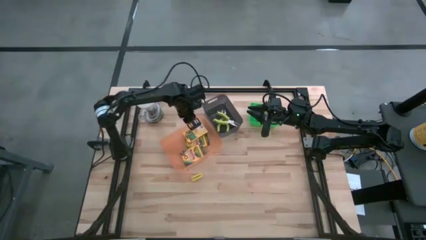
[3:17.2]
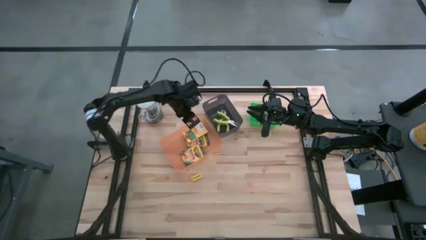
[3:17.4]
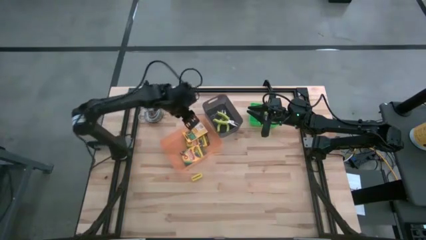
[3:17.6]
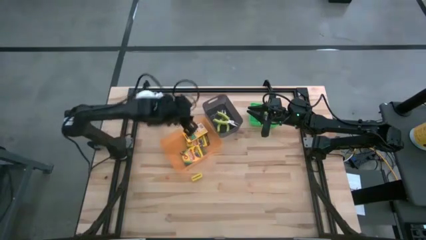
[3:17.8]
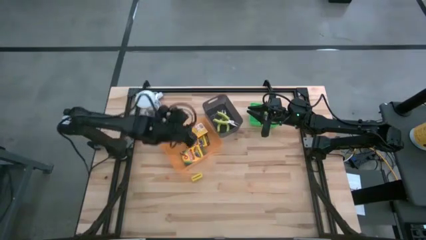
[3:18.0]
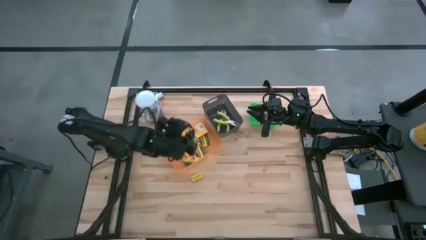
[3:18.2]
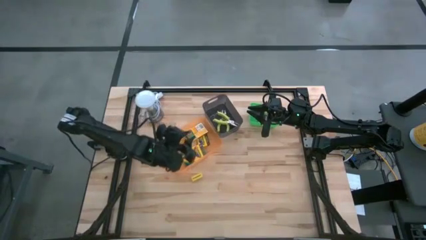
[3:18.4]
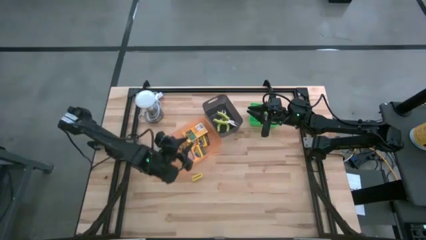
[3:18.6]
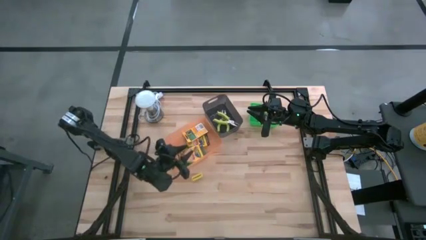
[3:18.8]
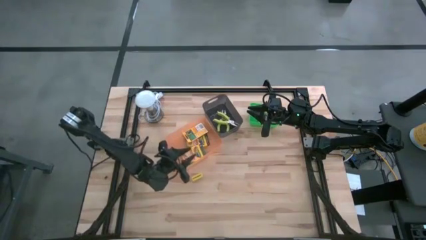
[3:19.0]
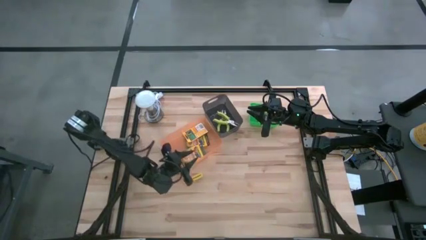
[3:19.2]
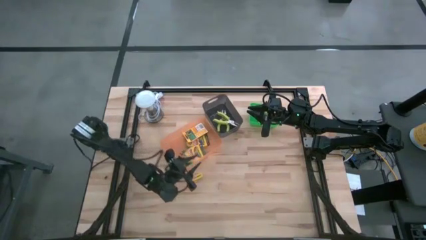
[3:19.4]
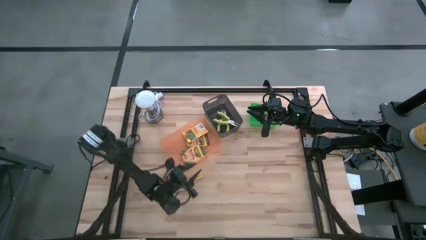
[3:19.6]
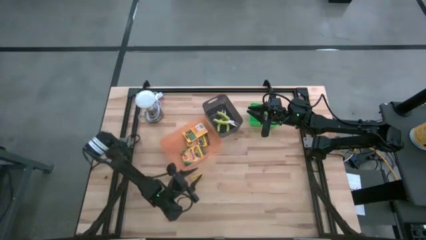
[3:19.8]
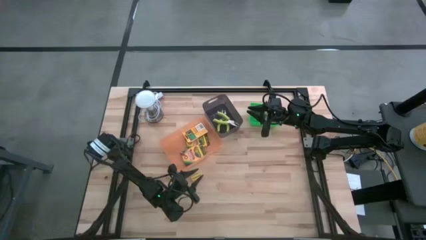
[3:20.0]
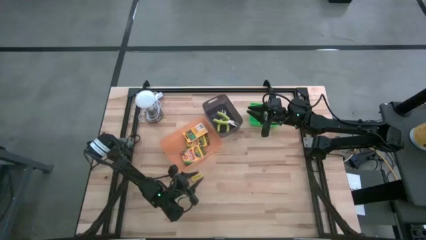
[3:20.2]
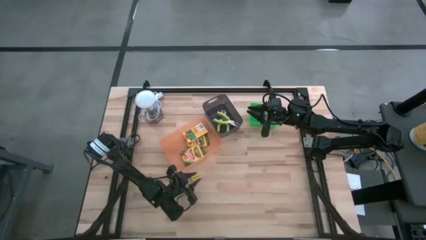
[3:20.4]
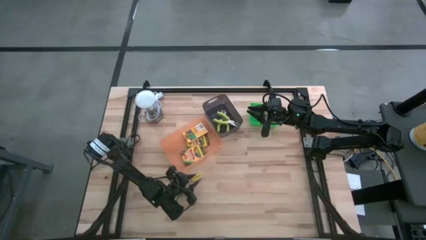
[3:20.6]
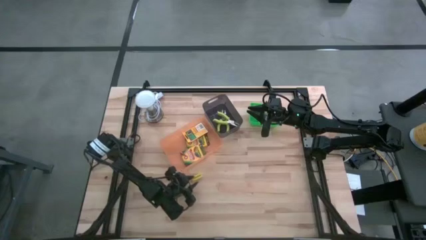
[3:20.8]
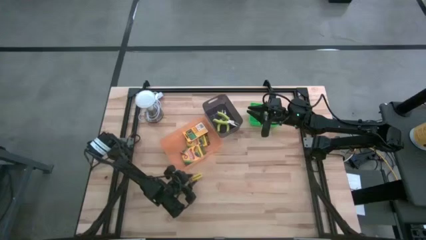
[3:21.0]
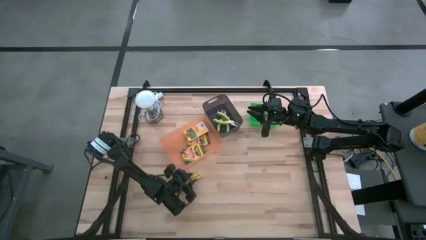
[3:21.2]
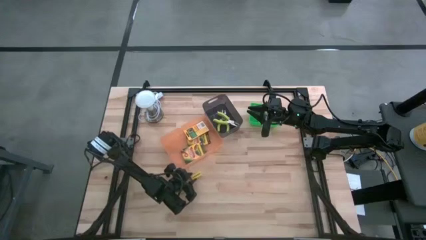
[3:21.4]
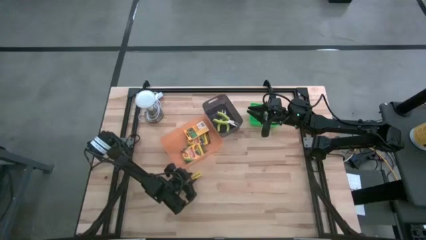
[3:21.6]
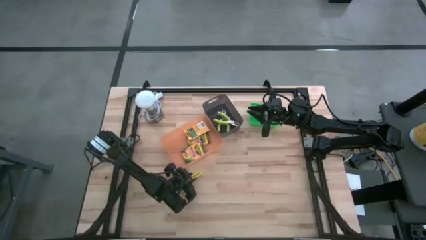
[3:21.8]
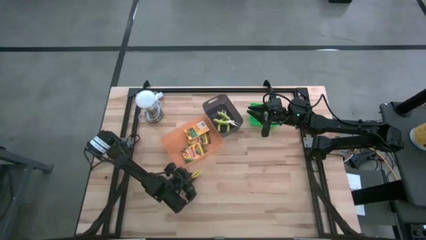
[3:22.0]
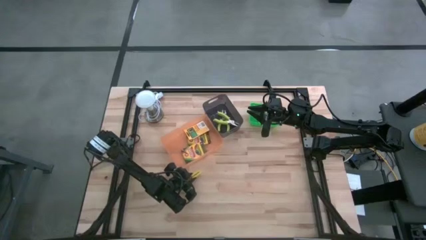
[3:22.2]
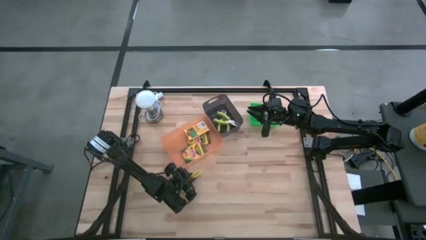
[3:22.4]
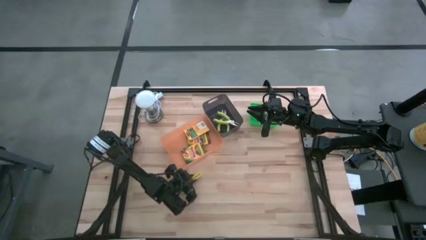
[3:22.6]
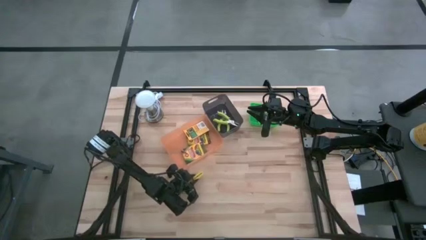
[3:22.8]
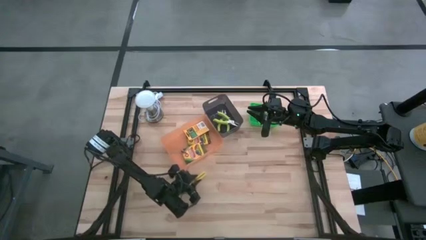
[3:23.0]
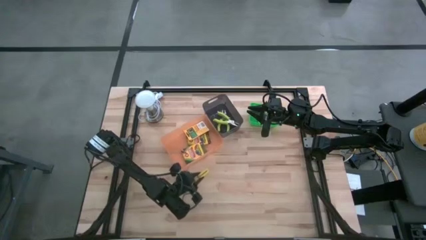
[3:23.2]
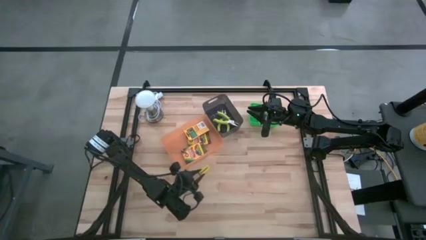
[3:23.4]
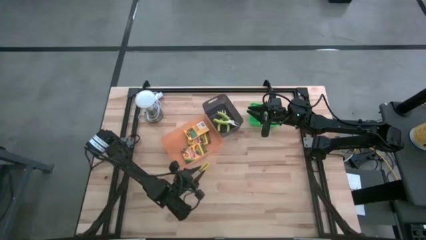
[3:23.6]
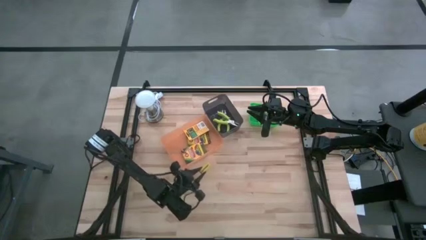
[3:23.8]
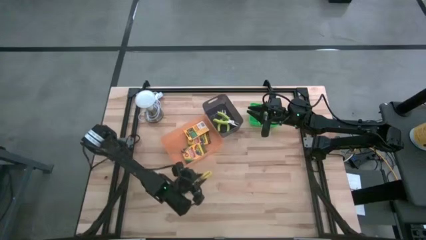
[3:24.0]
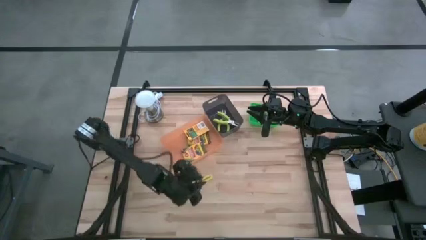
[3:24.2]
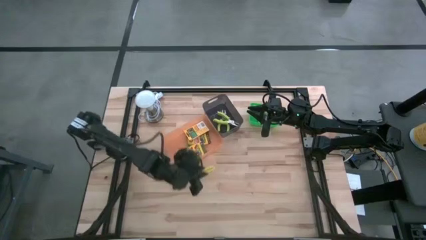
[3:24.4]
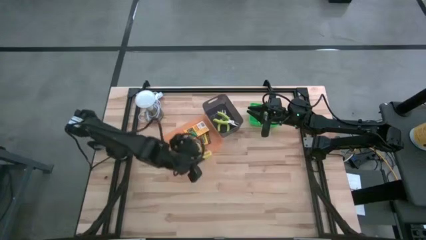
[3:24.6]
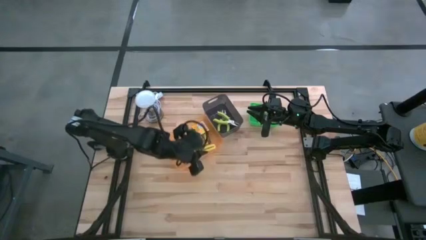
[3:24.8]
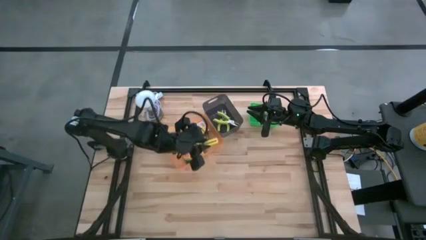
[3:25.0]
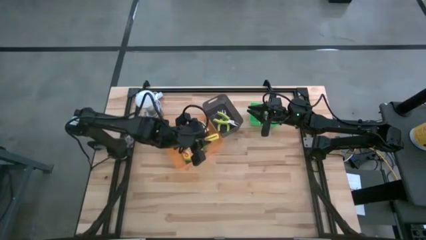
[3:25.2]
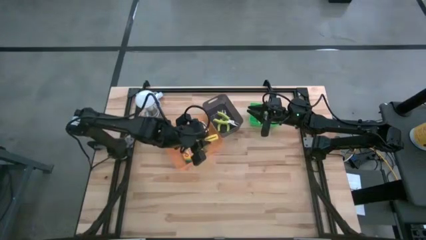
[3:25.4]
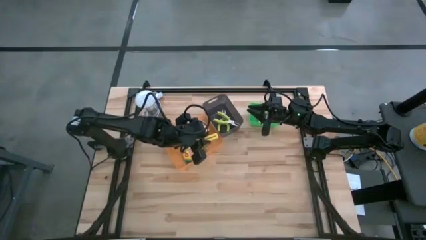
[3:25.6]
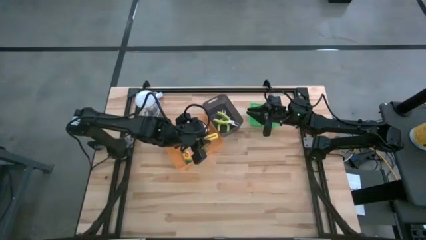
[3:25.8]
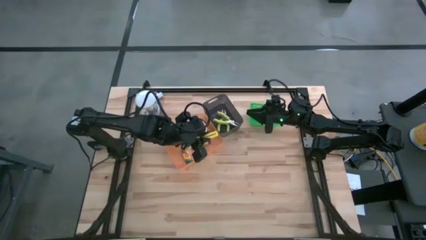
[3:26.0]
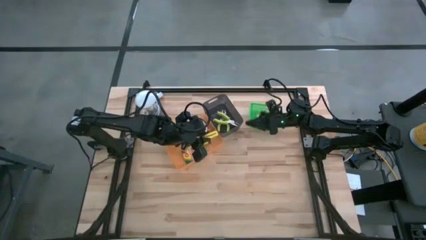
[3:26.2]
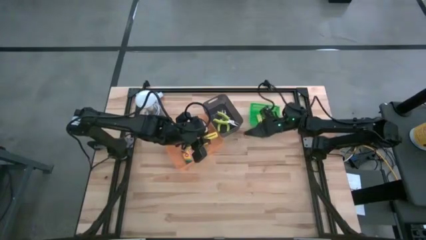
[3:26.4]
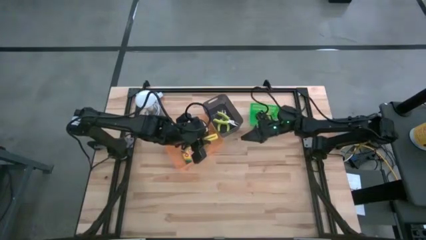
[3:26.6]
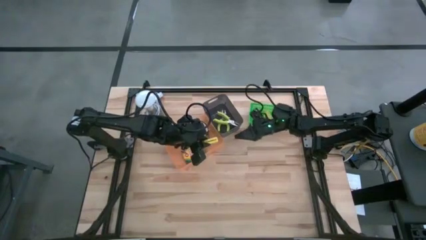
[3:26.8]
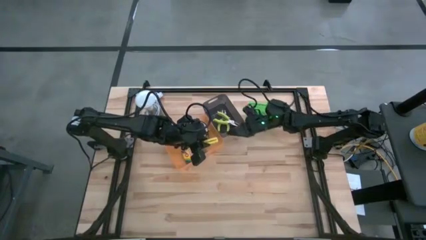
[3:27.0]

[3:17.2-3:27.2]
Task: Pick & Place School Supplies
Put the yellow eraser into the green bin
